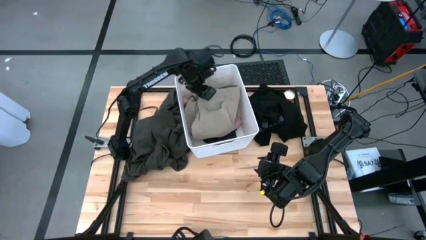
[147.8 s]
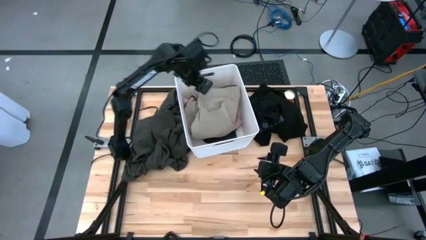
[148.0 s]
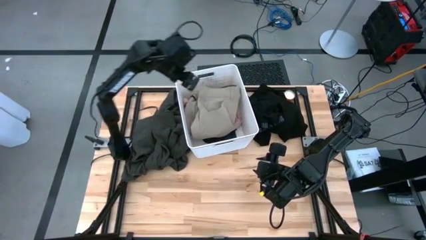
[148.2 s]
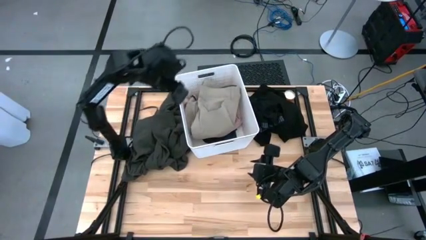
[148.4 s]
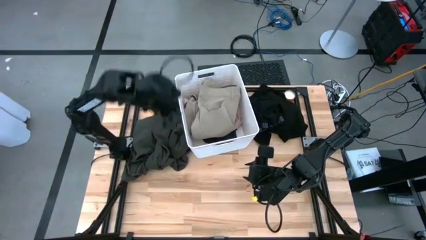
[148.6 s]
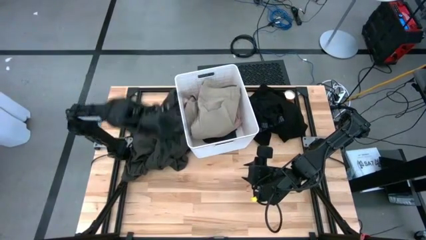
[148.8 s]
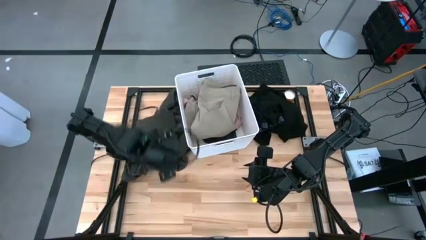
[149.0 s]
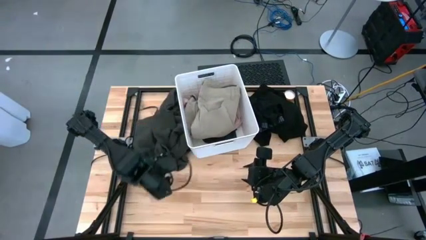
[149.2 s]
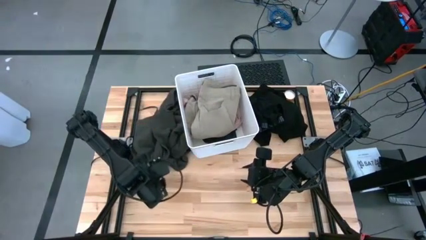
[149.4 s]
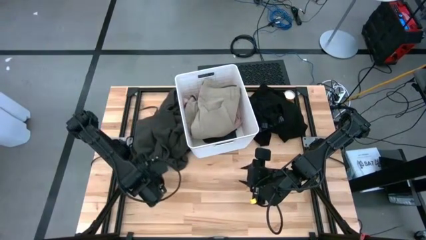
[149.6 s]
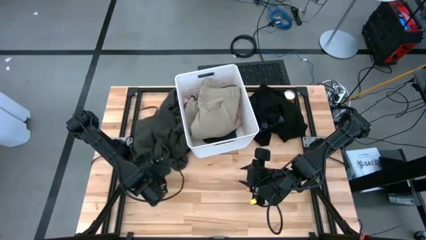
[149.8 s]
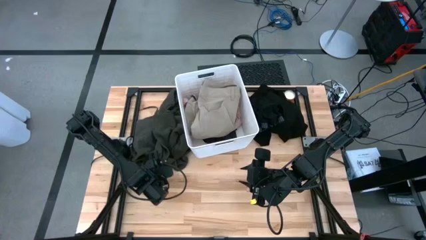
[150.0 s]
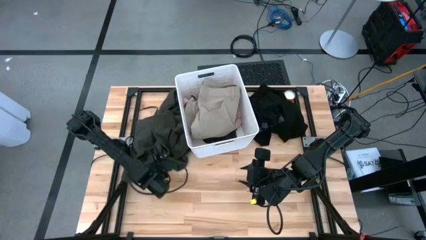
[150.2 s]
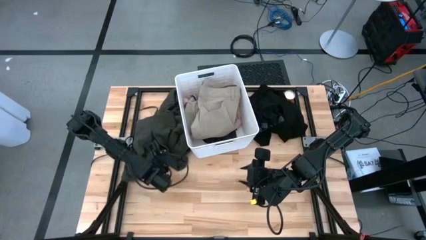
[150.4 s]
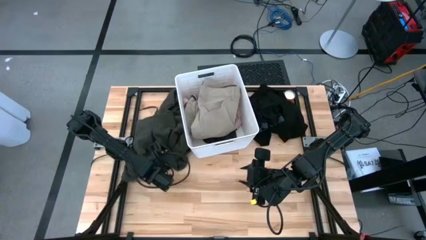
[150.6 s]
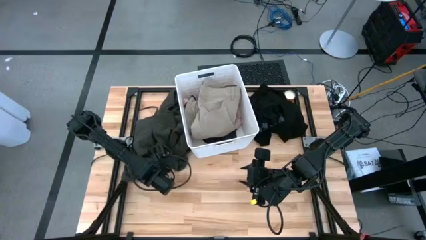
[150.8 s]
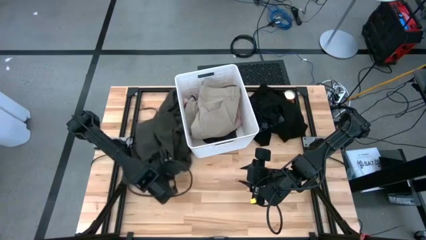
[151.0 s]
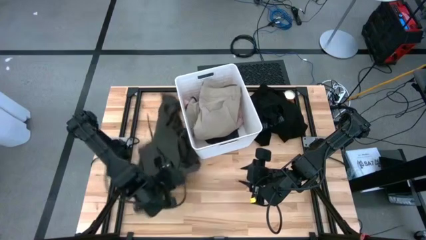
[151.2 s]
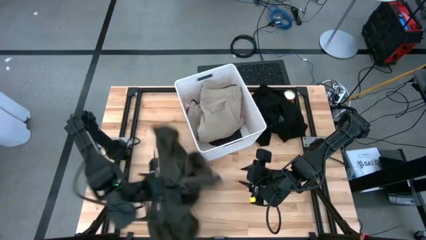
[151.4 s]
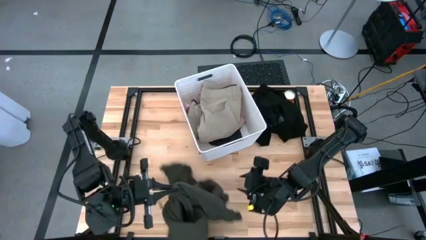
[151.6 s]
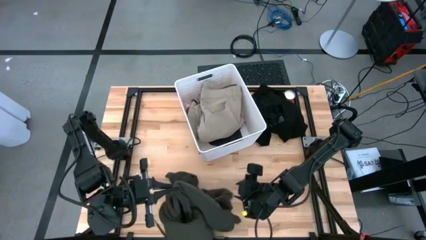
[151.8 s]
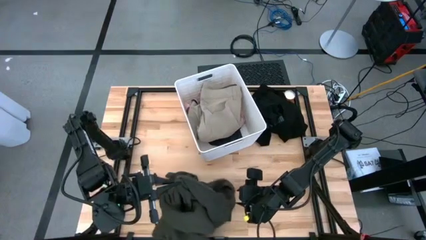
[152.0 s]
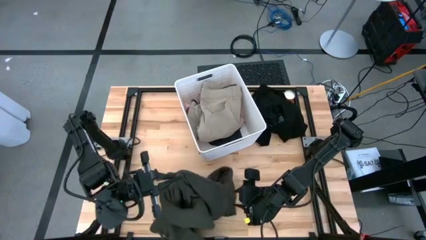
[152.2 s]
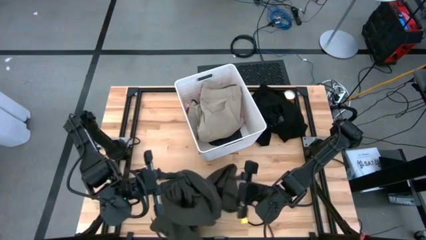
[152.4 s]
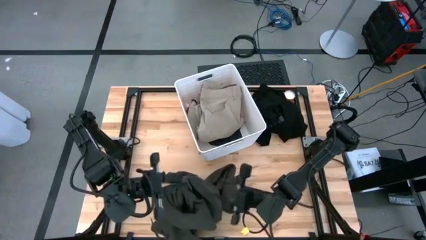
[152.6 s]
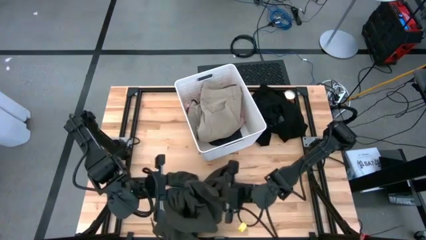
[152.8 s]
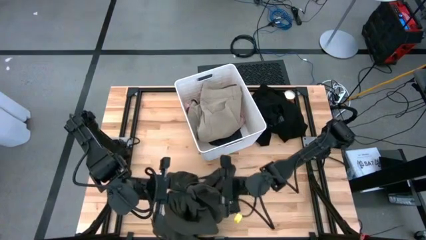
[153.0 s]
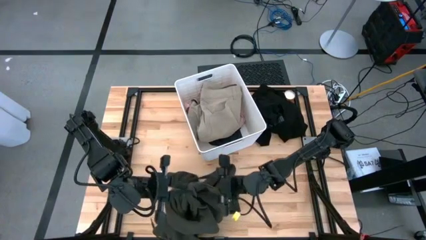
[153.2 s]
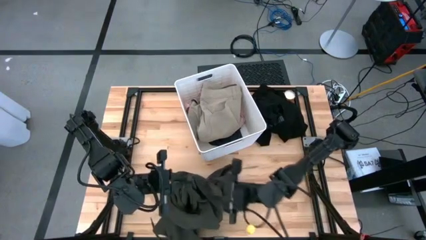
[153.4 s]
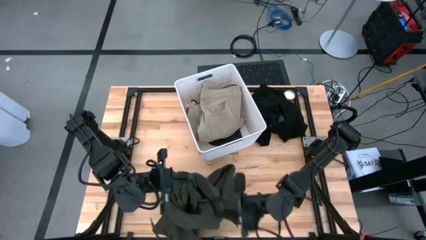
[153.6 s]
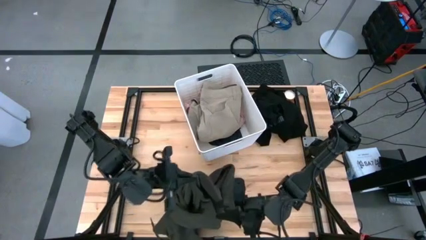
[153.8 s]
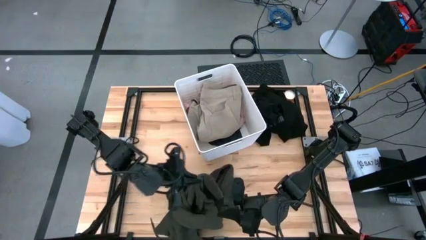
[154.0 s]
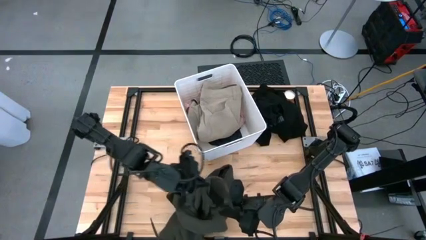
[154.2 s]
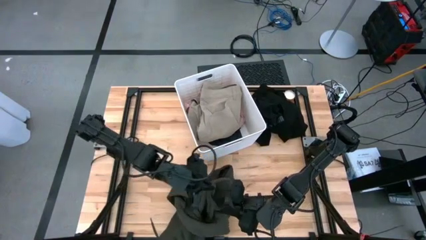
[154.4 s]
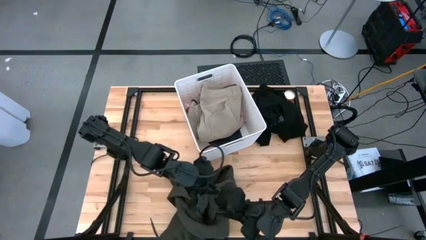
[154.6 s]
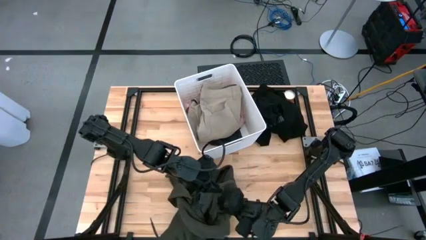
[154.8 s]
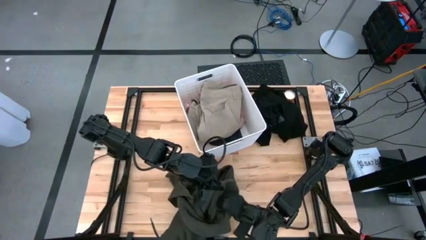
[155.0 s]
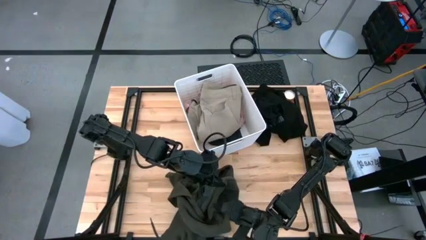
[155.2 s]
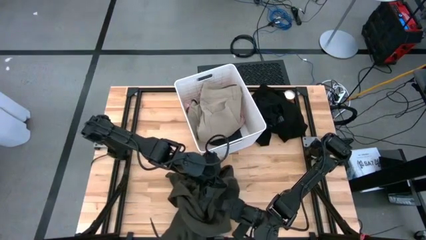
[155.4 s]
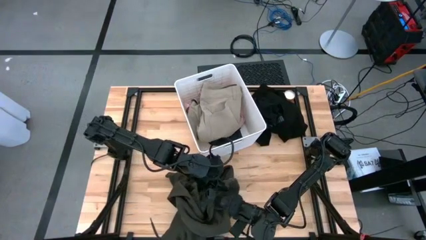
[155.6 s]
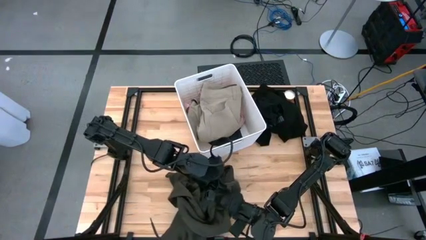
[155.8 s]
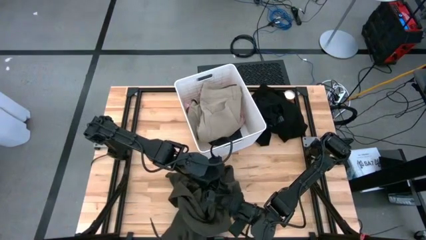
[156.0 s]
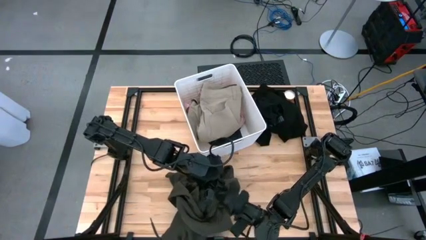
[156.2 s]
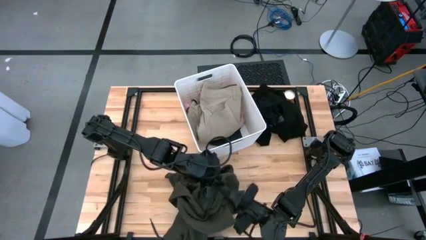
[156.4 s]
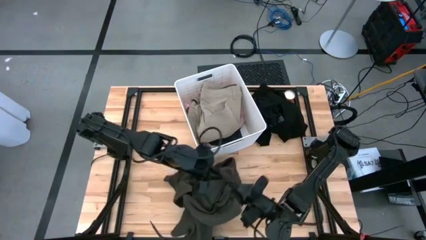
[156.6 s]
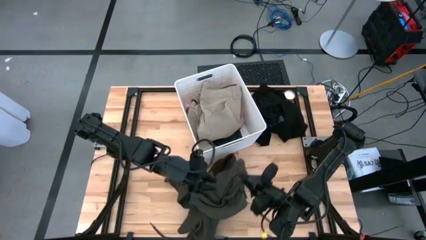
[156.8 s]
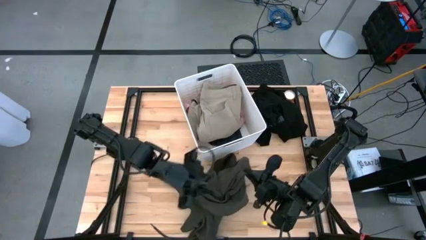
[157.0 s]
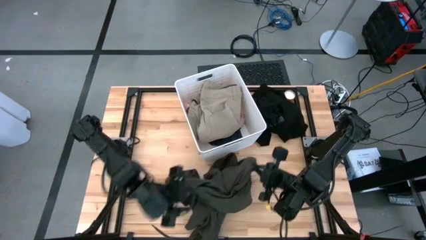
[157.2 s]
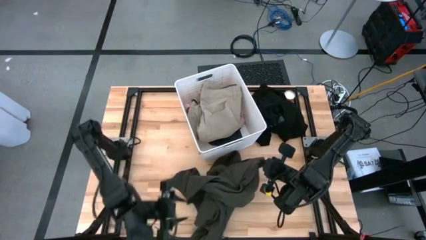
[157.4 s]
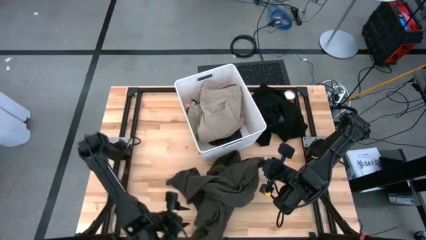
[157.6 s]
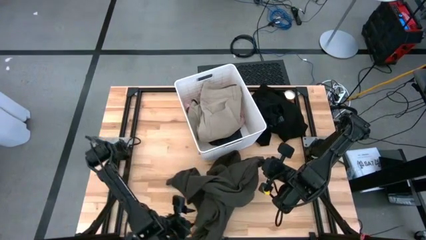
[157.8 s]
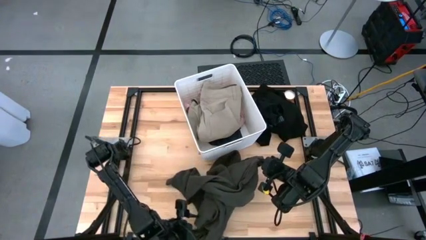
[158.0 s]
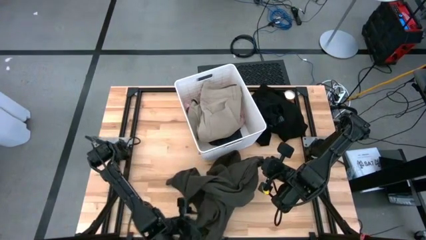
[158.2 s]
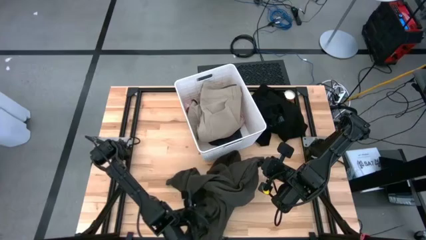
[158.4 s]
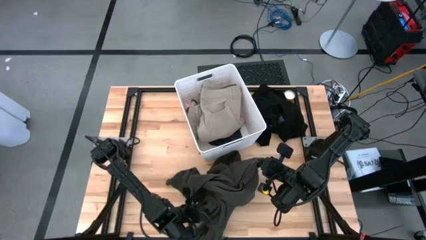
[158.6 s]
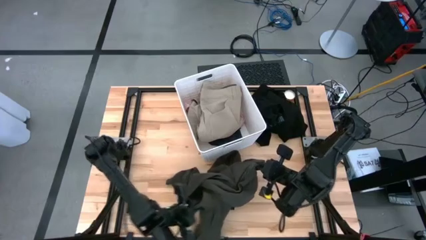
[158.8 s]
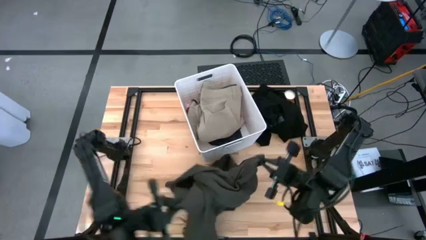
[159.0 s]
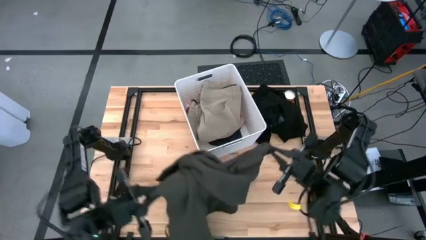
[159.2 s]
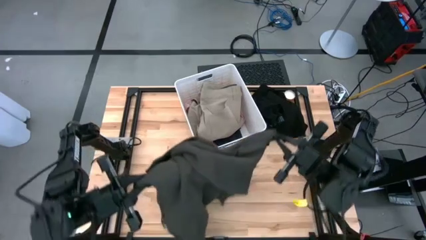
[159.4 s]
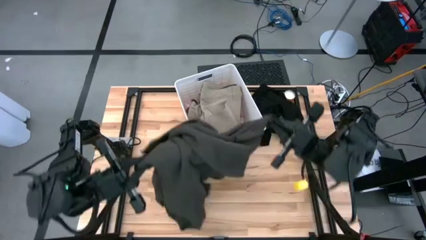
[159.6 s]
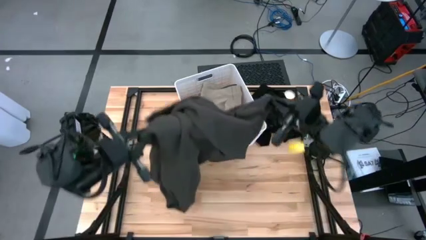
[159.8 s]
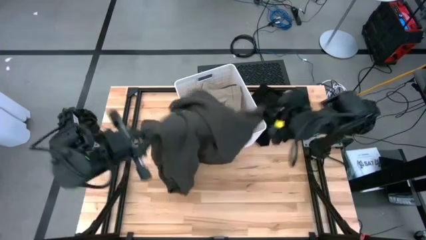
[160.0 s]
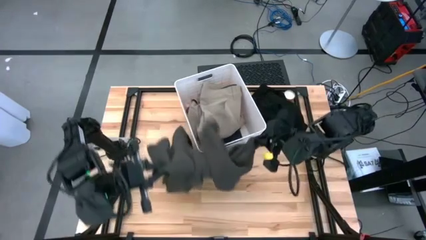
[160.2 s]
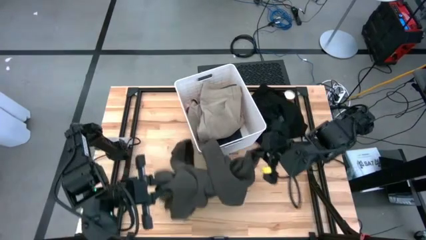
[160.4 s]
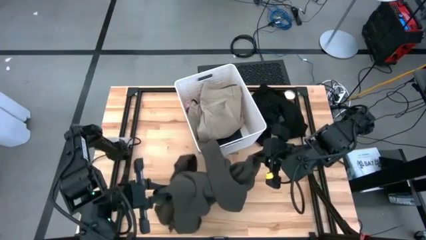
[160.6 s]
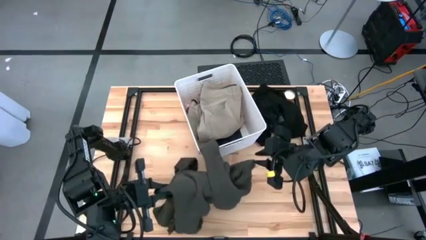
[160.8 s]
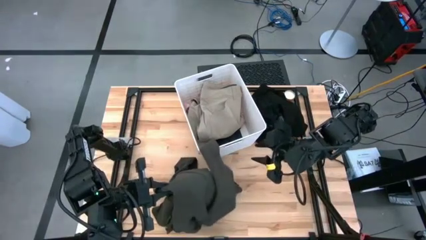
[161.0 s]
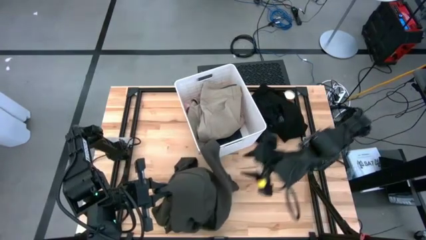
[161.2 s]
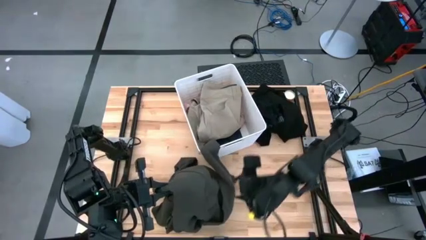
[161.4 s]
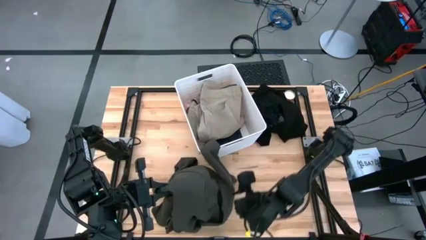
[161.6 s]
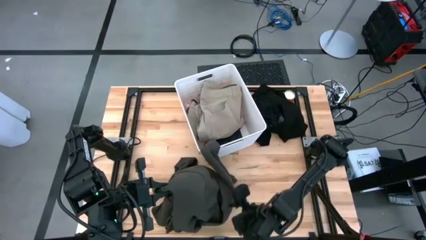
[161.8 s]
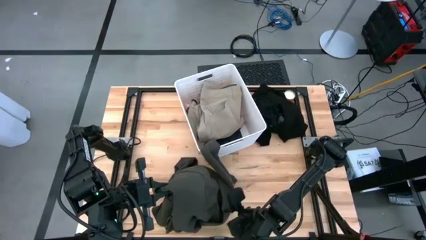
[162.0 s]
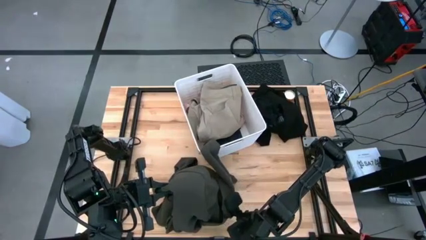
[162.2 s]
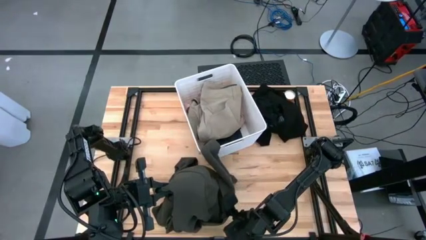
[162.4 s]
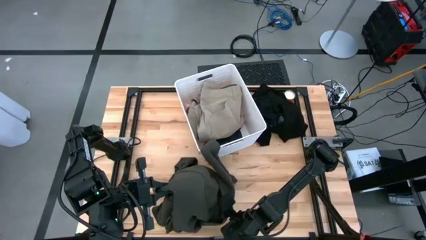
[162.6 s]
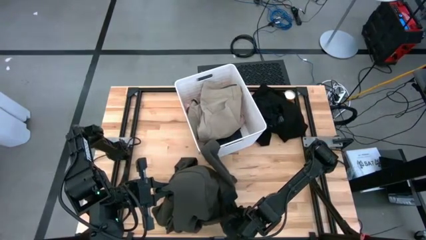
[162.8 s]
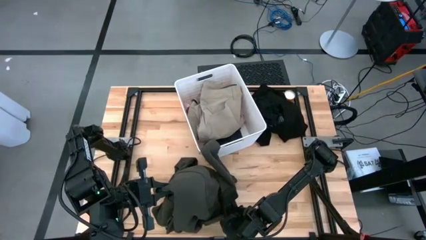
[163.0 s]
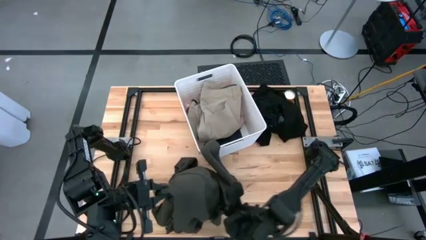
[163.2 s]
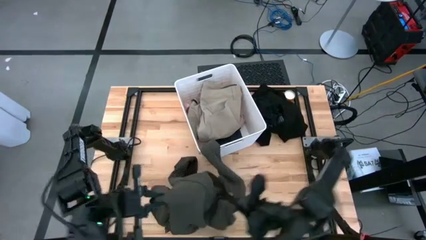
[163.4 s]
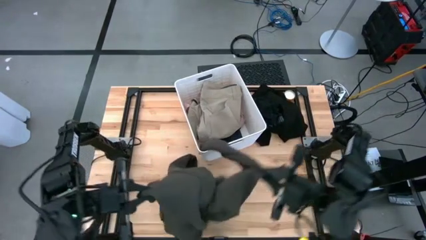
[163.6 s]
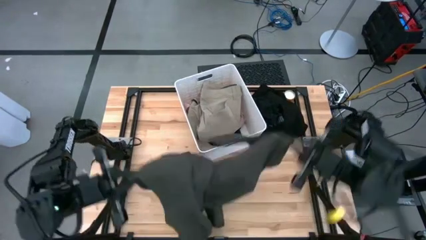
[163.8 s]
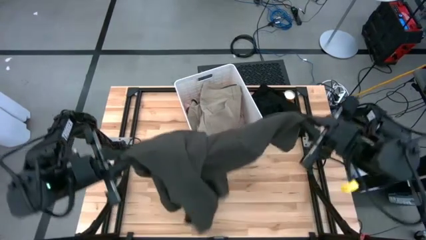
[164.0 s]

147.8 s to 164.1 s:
Task: Sort clothes
Put the folded gray jacket into the white laundry bin
